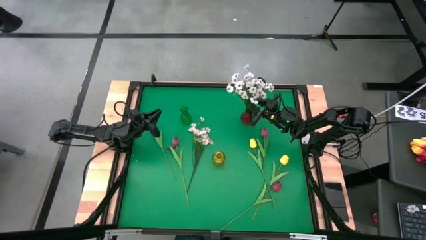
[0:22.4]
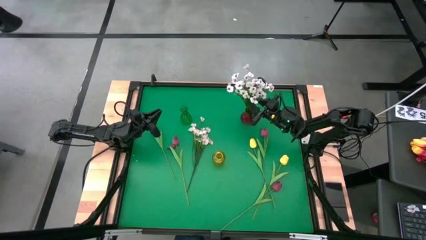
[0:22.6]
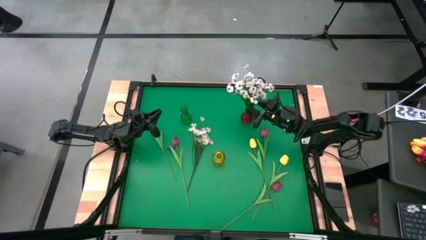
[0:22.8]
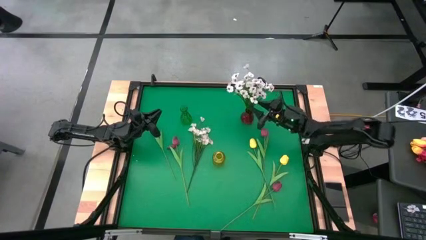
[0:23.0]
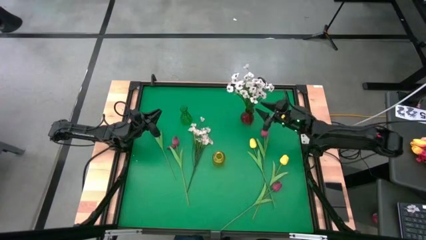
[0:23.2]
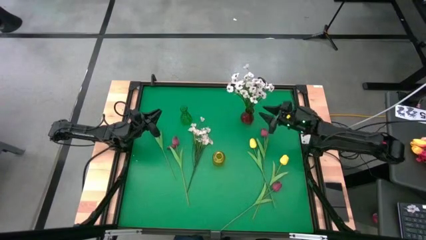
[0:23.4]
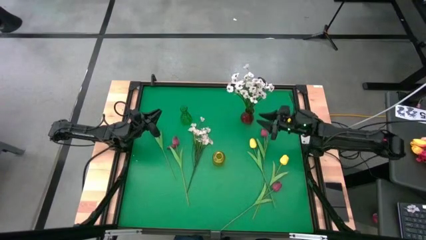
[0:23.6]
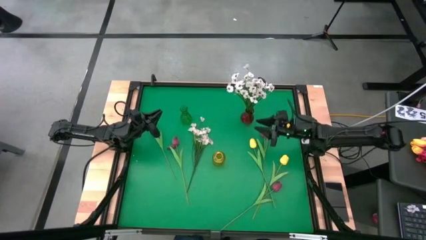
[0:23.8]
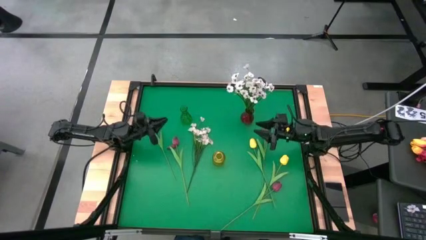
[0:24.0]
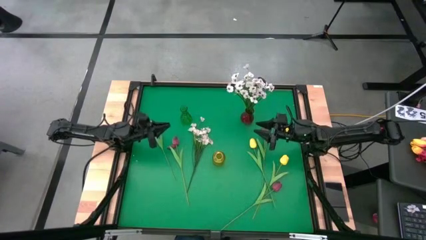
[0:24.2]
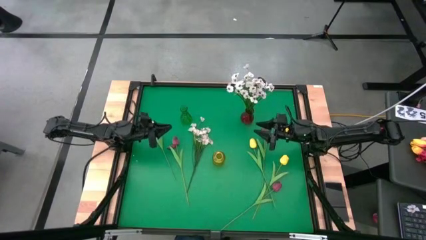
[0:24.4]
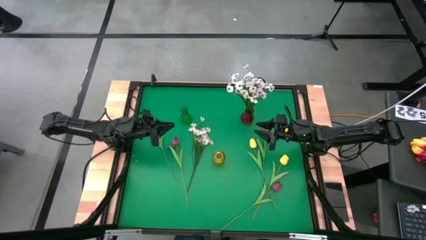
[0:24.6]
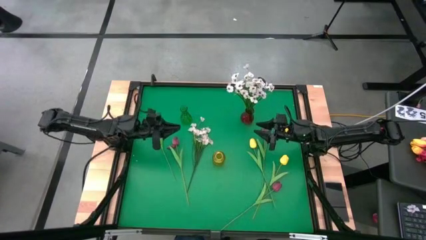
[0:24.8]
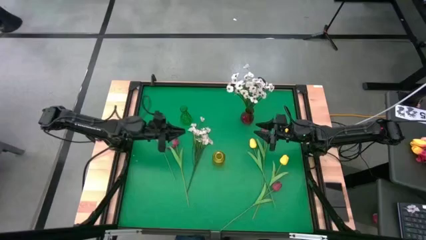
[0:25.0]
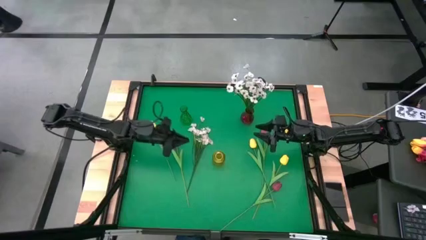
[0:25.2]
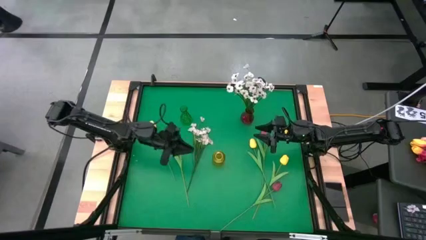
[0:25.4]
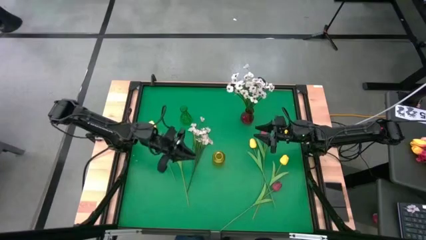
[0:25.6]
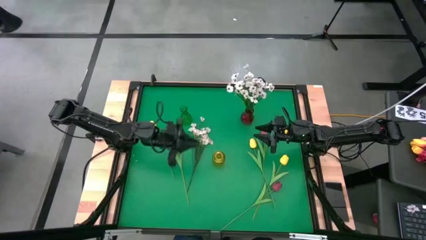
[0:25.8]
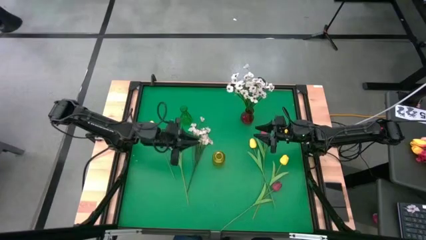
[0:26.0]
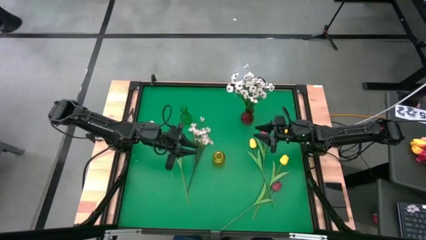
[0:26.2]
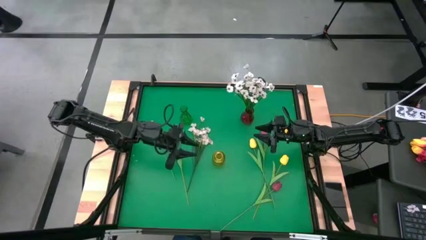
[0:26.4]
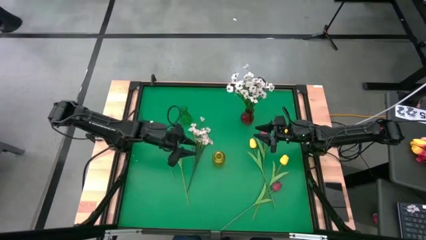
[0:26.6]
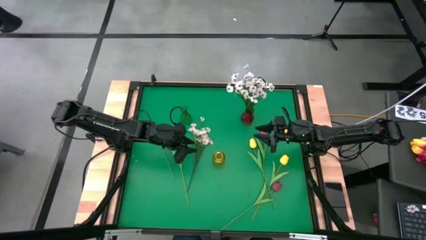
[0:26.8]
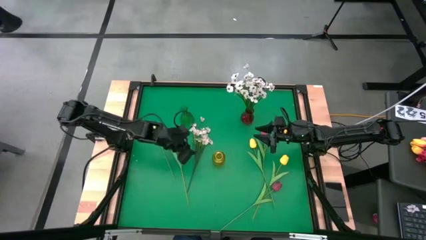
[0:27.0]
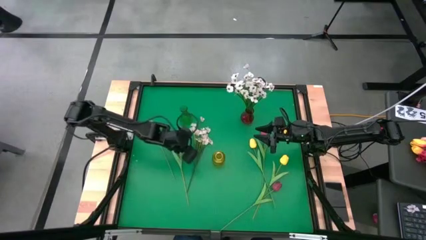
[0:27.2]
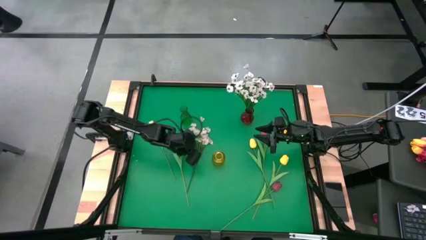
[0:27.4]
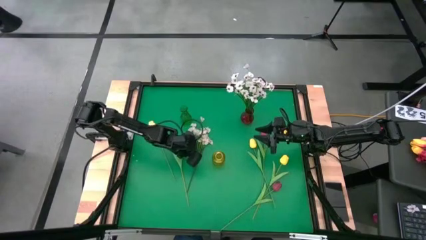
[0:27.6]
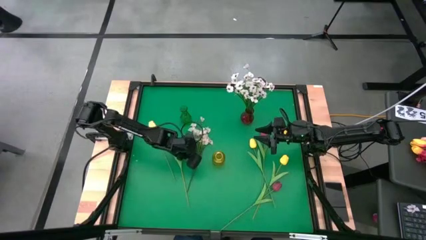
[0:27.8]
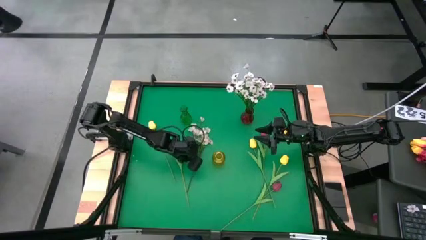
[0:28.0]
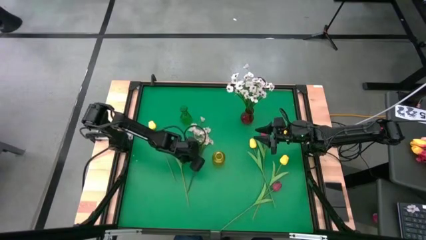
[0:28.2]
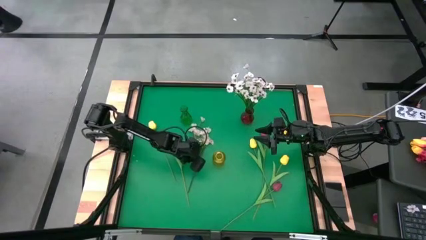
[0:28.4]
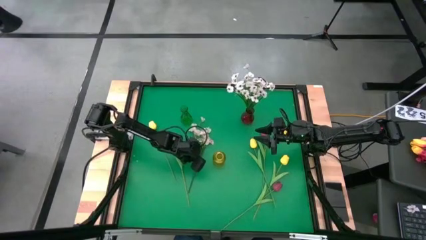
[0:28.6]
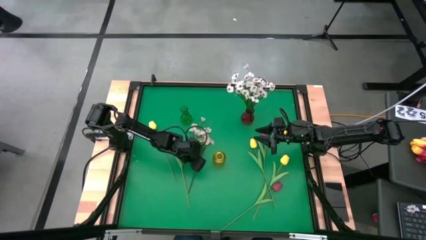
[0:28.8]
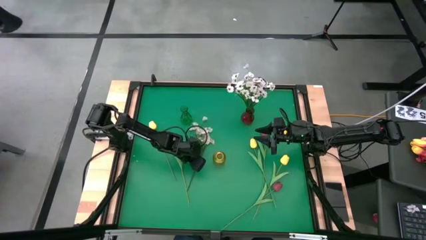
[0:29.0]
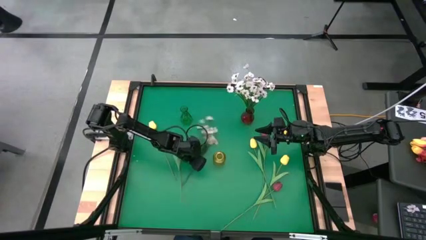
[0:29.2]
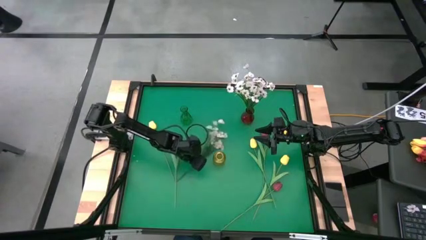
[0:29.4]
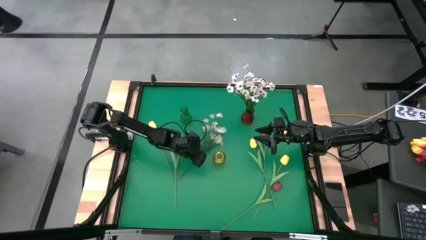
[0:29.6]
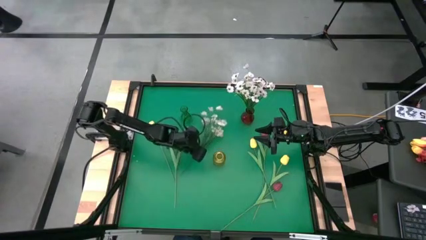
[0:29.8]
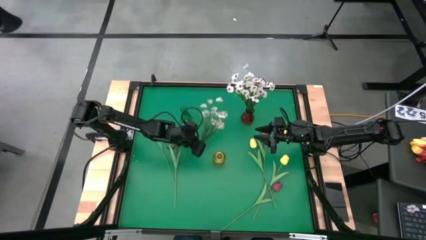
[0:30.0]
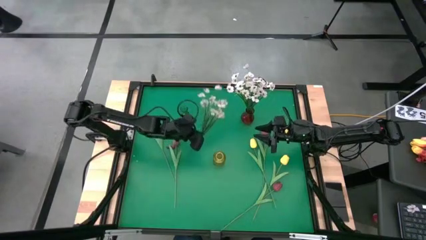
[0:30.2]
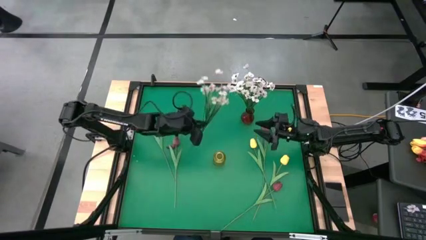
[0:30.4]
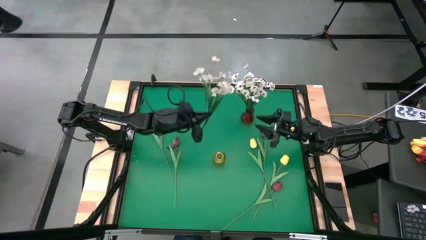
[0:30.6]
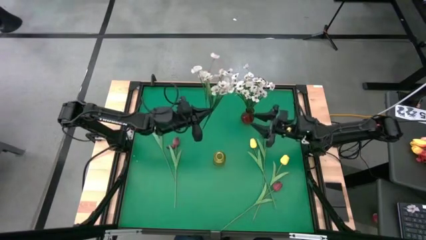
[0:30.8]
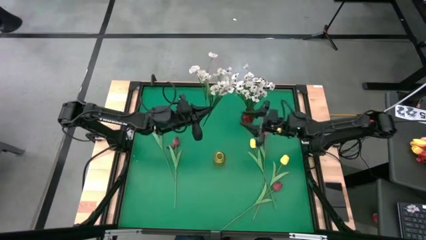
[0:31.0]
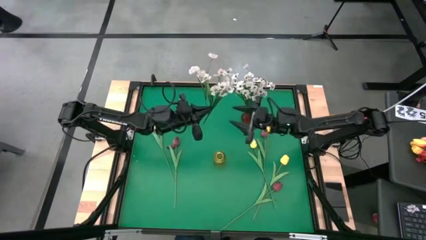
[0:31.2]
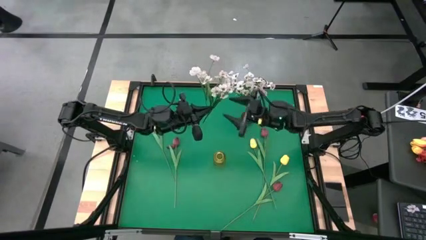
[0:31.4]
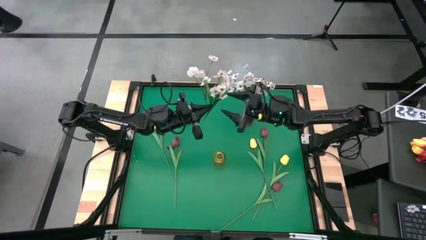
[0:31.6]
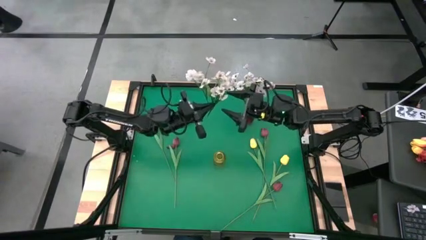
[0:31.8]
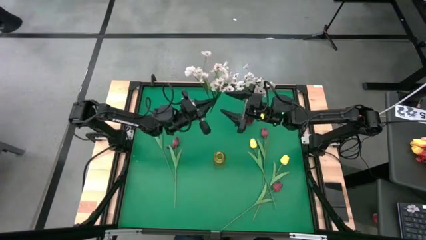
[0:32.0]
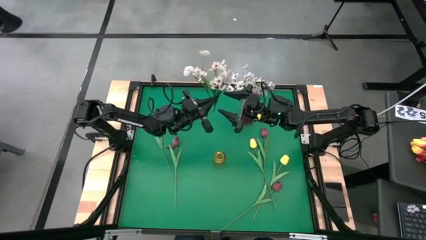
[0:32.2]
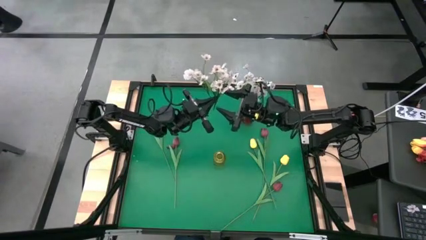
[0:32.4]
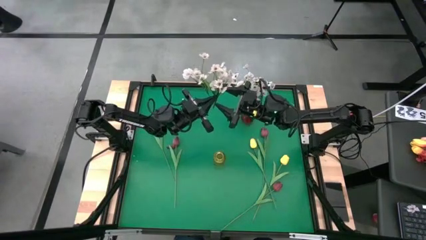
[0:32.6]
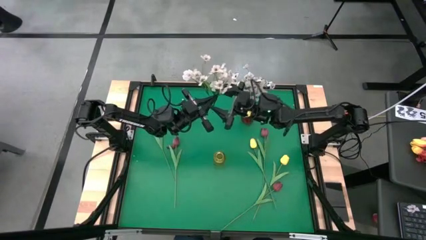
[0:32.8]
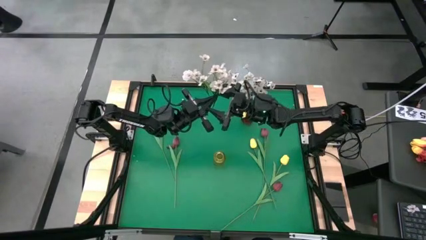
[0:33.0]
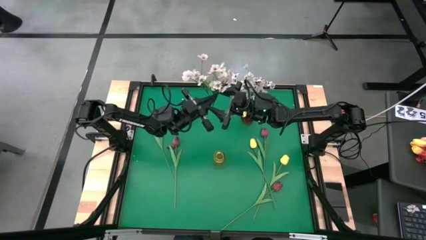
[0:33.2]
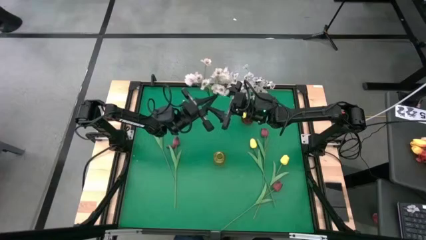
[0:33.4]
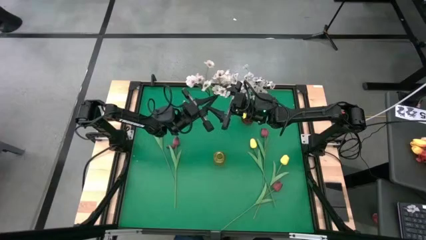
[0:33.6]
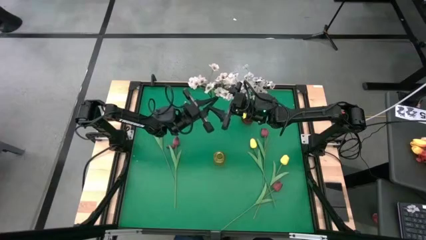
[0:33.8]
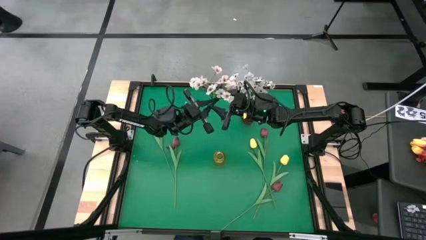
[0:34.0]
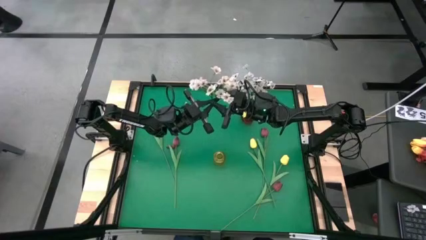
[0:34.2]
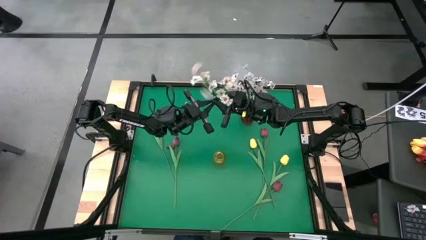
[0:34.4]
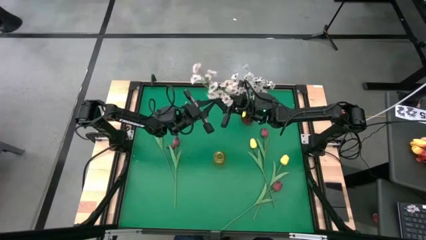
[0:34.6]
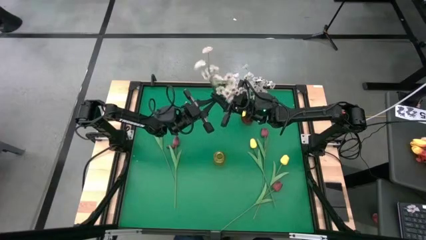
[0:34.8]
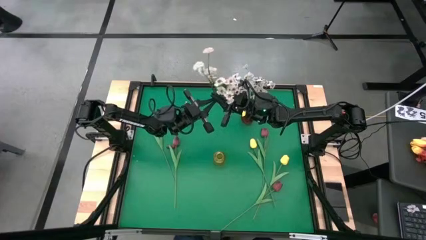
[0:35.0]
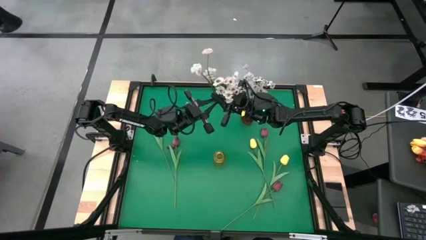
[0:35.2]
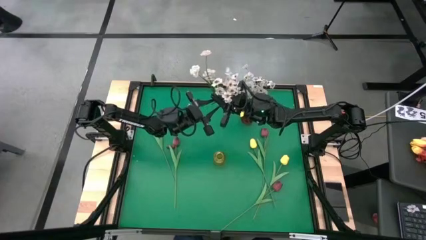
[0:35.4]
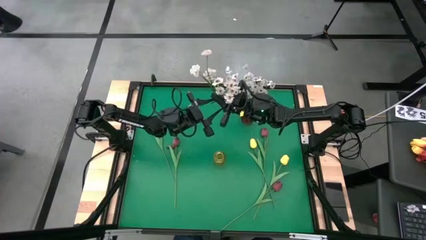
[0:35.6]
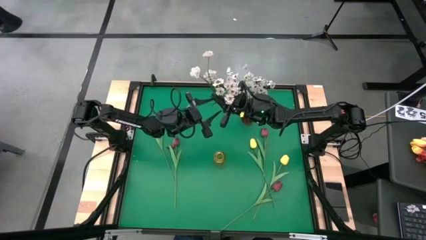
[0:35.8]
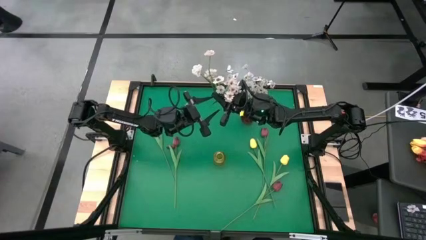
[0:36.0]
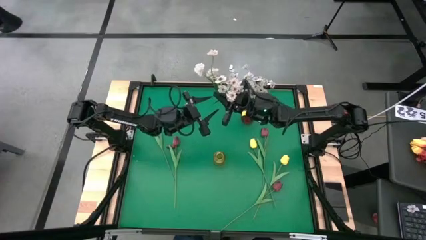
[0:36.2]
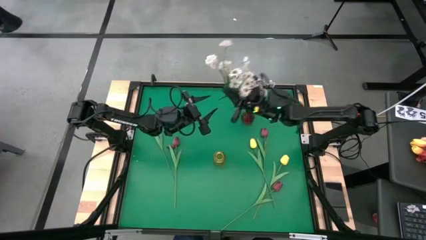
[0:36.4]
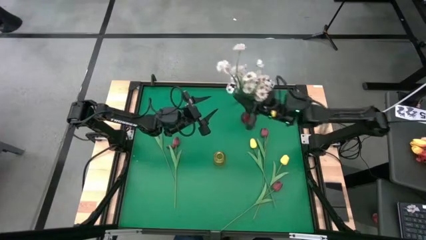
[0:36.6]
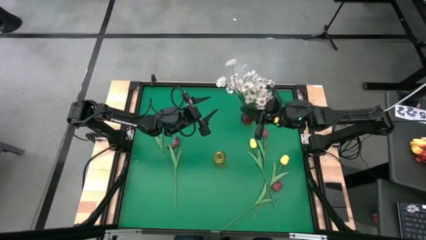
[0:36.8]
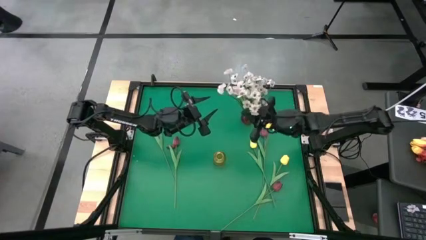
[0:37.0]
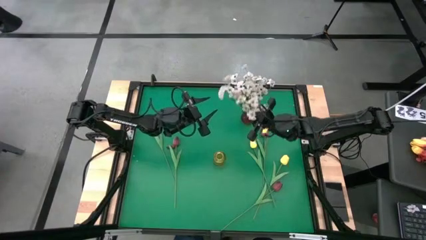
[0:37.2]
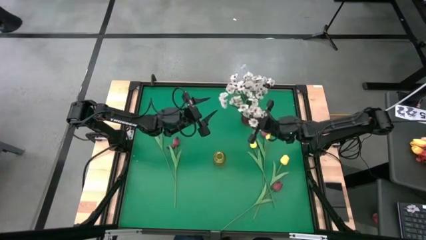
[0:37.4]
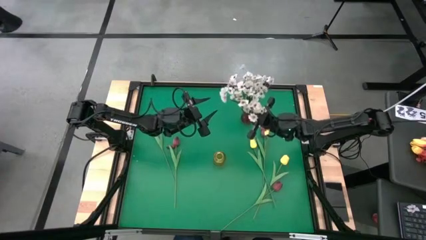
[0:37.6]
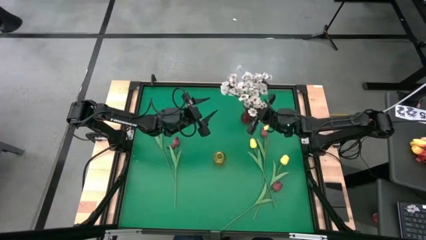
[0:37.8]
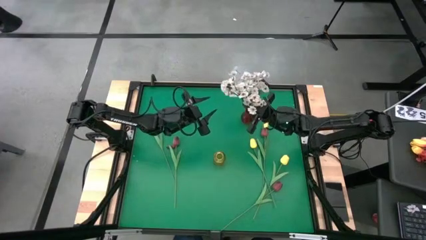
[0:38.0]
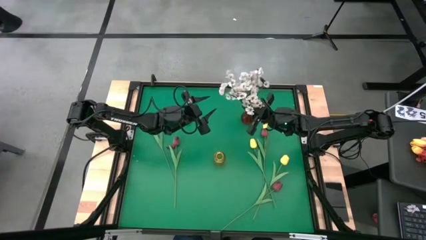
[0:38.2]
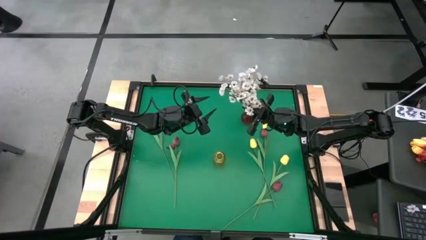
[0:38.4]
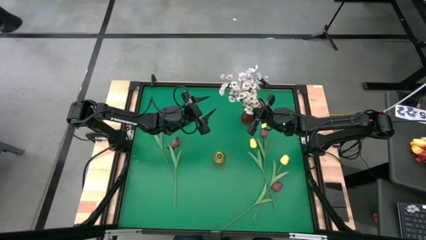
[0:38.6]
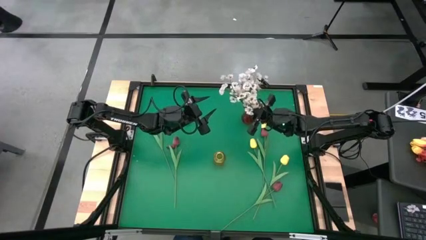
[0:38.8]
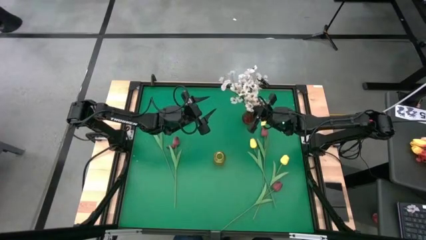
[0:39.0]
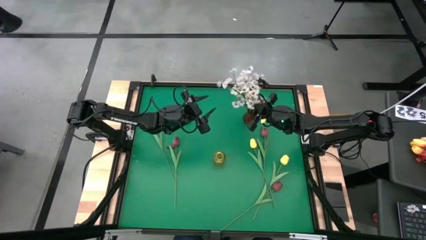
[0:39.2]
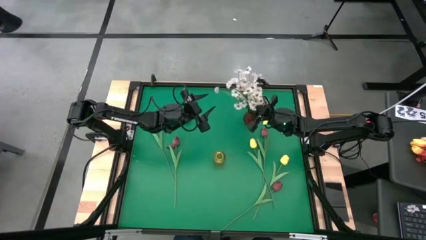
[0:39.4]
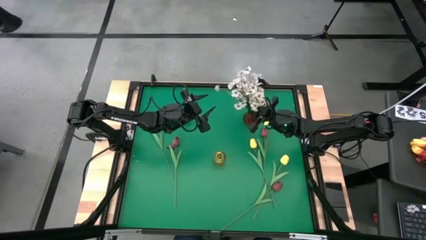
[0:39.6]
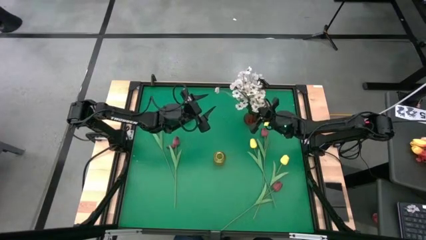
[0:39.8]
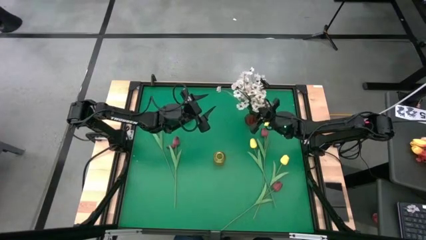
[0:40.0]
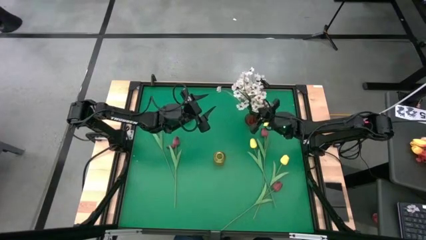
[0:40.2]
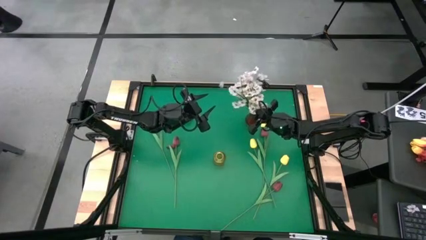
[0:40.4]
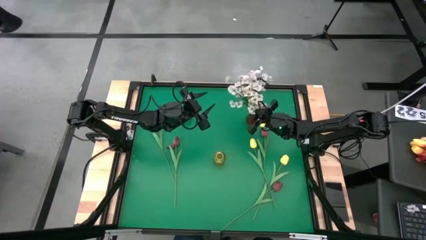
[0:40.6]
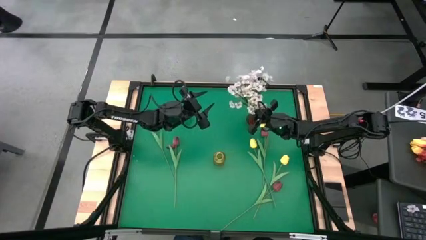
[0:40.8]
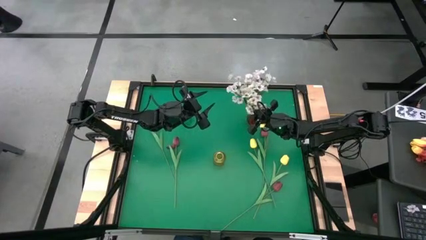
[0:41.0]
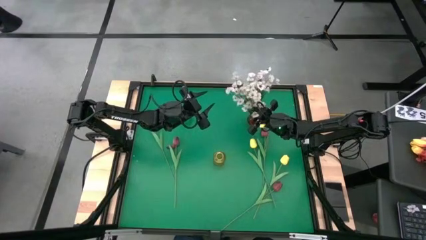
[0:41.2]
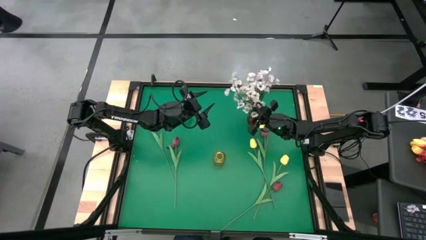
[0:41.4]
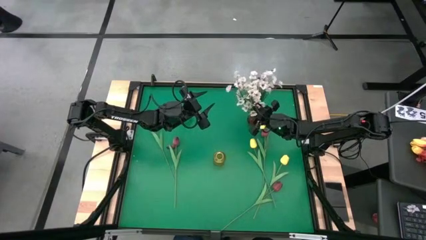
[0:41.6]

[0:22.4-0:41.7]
Task: Sort flowers into vase by color
Put the white flower into the red vase
